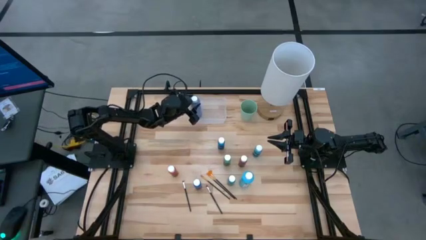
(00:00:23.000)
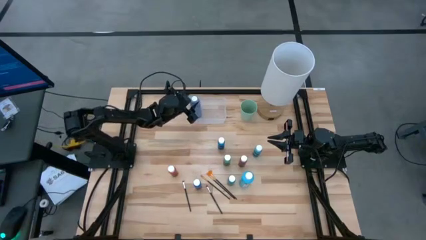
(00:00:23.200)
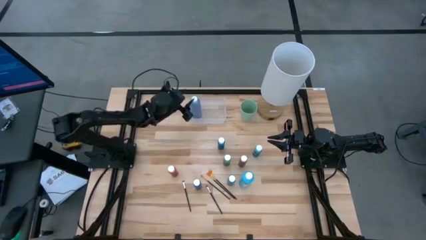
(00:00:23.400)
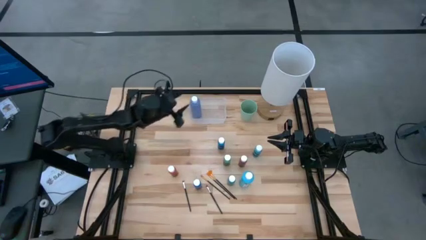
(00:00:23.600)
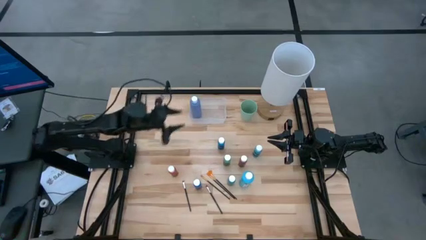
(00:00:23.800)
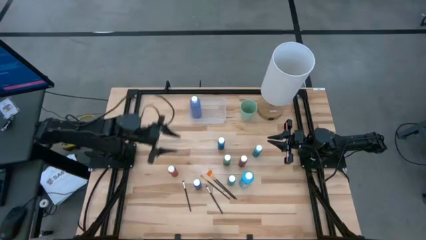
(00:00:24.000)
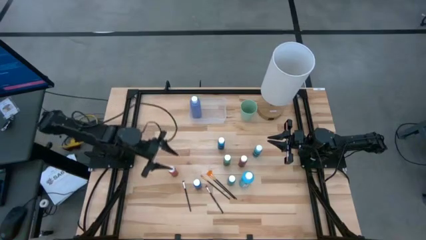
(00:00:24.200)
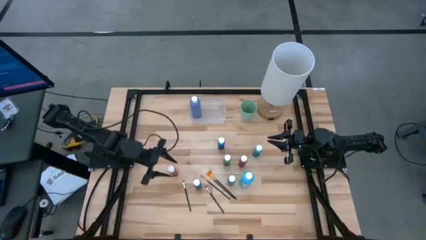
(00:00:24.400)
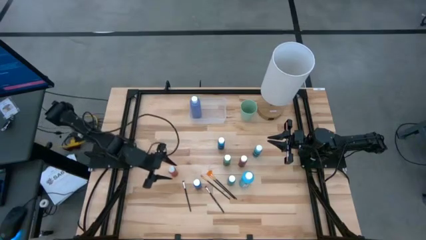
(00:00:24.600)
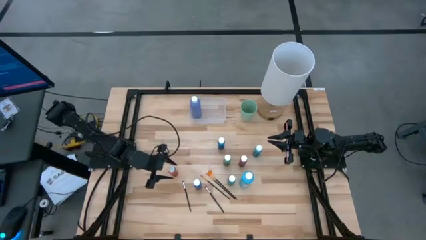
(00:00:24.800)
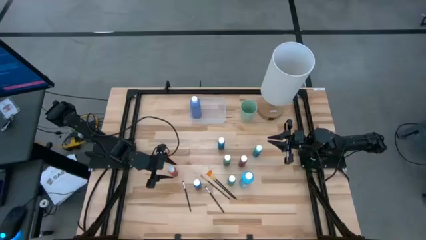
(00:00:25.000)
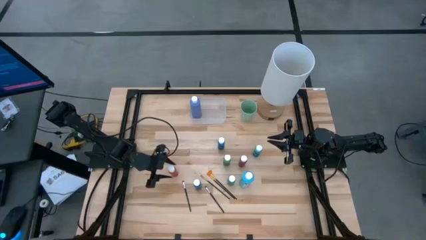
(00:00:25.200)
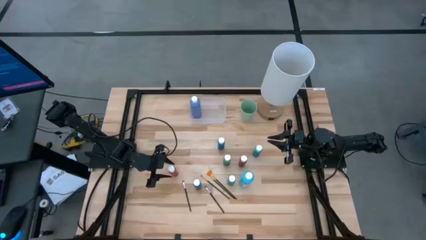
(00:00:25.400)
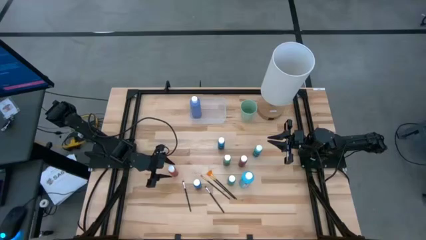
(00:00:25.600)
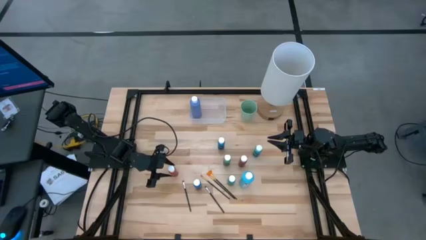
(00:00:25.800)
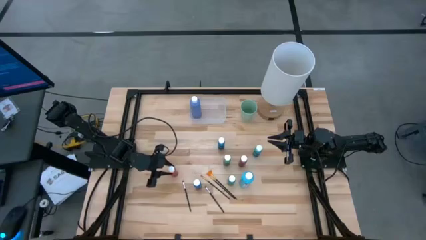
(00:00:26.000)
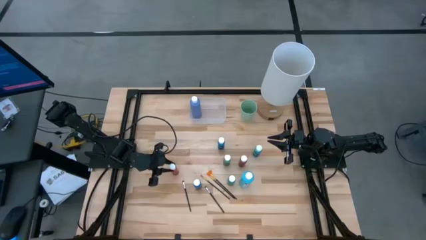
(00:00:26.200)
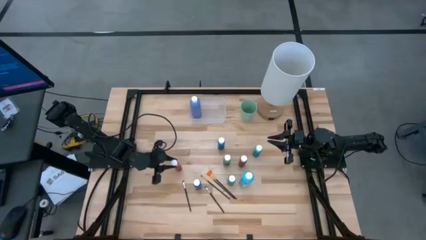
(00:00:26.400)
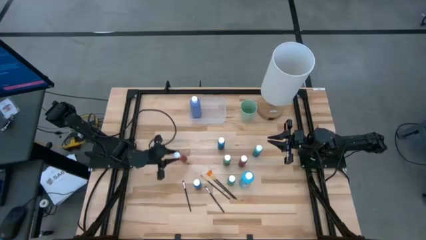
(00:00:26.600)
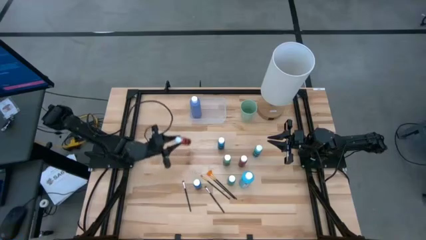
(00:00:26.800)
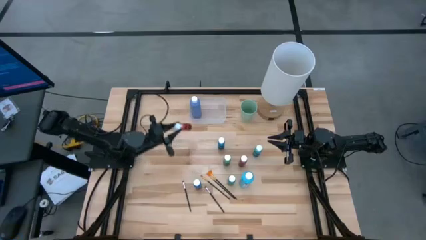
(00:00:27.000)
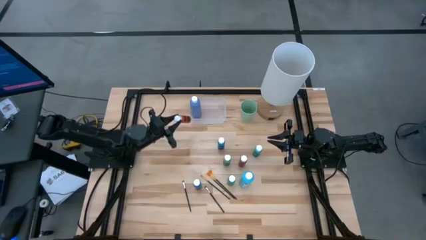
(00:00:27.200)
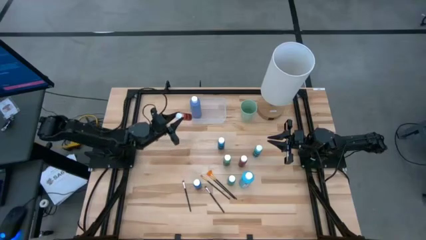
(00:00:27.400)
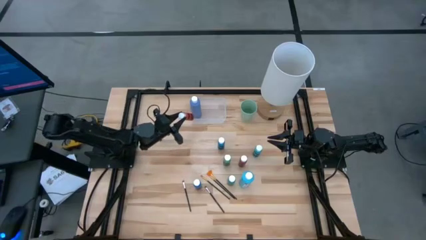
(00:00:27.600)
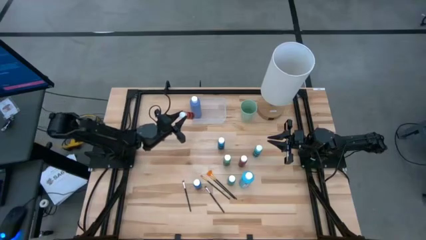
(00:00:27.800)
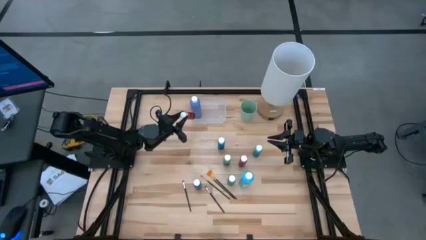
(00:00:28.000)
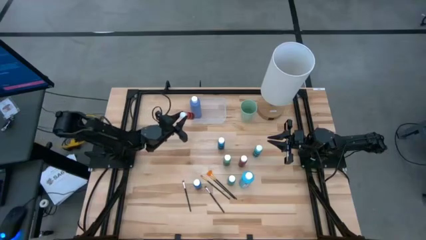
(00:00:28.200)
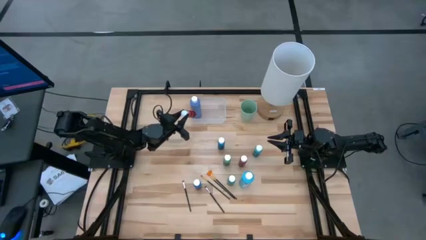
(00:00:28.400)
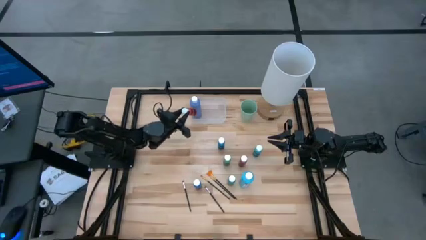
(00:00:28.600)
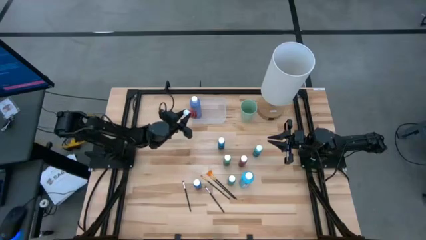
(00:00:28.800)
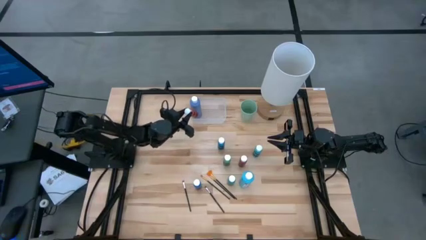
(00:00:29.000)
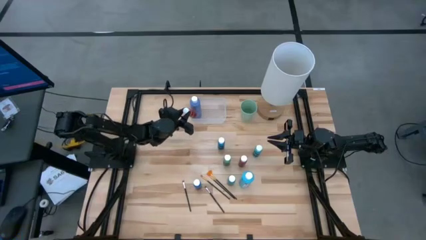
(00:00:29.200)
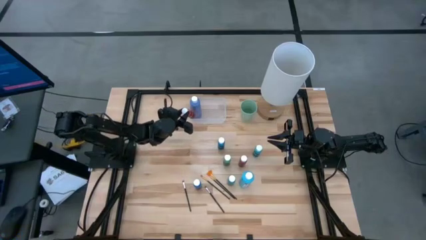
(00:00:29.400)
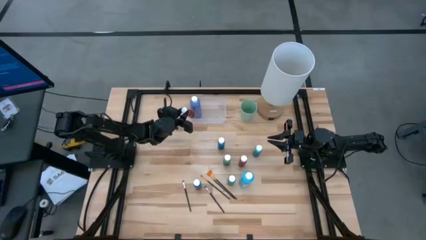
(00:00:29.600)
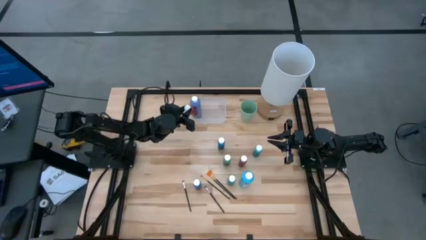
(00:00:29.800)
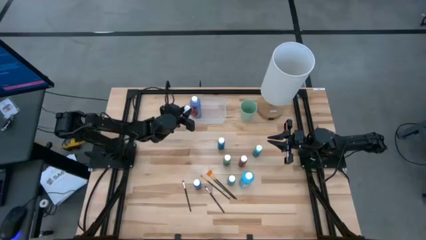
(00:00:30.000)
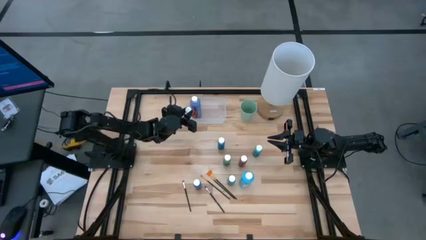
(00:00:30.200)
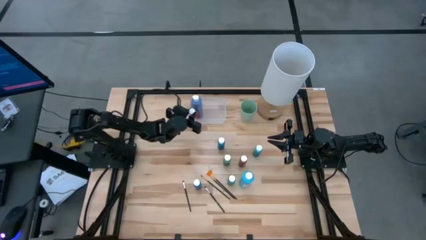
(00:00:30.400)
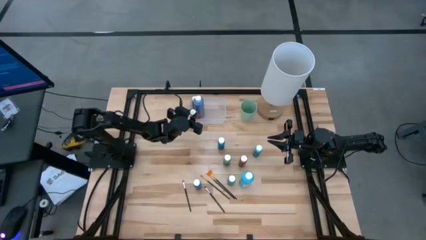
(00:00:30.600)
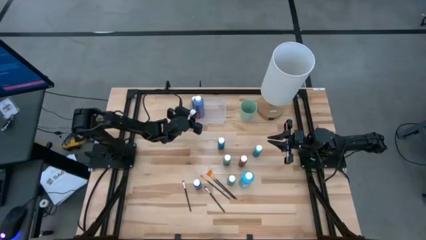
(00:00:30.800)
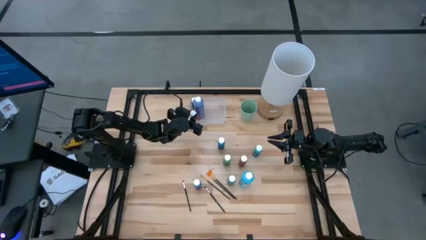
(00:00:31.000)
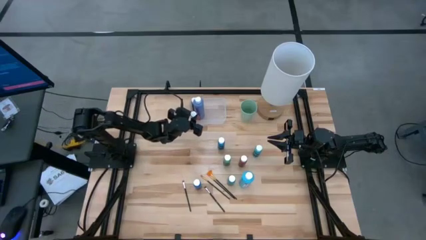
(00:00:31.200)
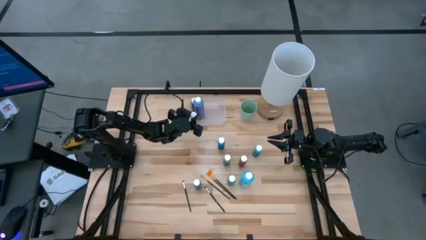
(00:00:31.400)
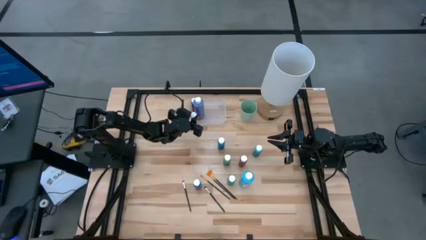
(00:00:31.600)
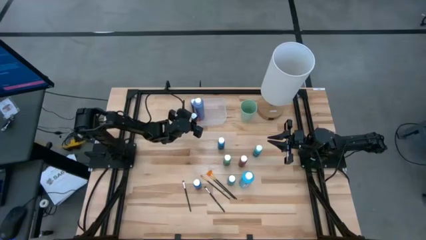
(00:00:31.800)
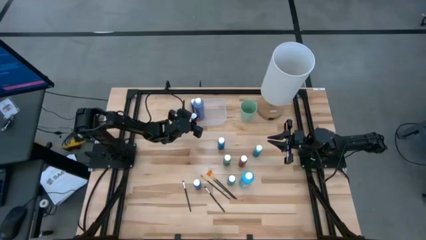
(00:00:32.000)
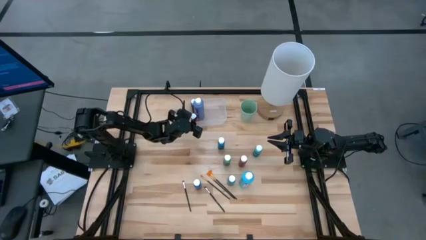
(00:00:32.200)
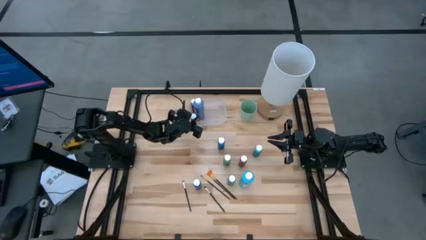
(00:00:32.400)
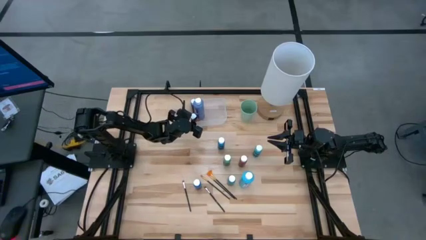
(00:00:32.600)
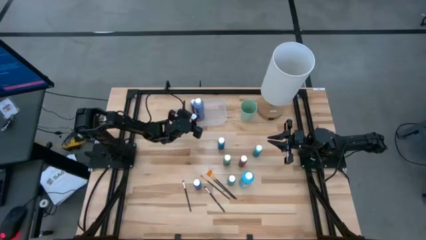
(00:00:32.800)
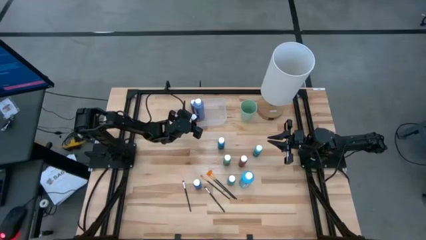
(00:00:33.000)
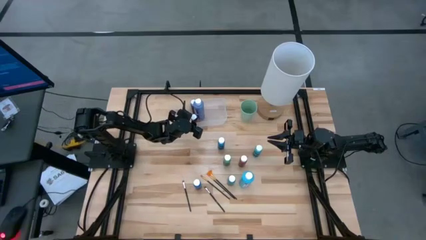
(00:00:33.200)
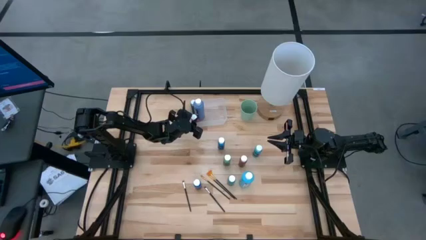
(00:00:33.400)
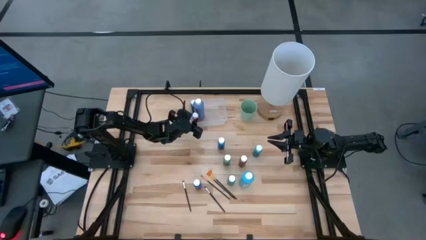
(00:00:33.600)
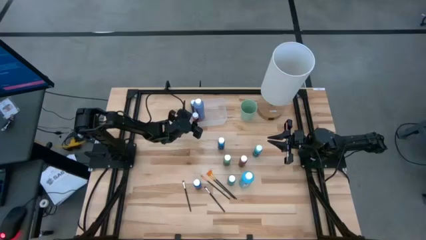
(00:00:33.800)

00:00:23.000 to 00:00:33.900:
Task: Pick & Place Paint Supplies
Put the small left red paint bottle into the transparent bin
